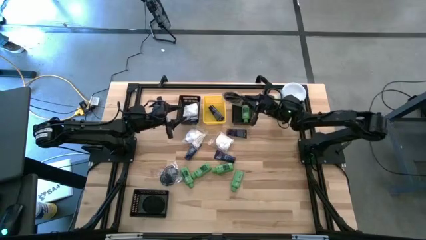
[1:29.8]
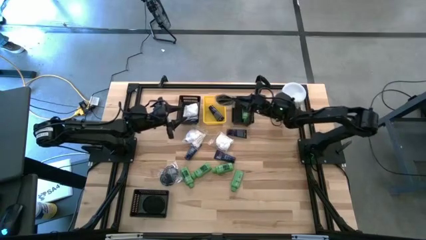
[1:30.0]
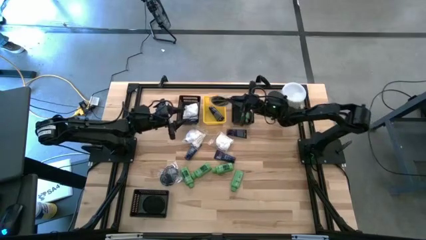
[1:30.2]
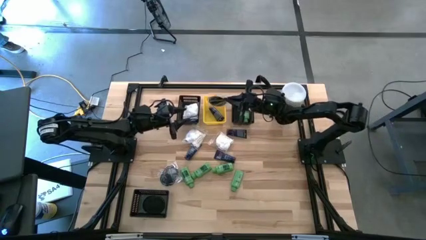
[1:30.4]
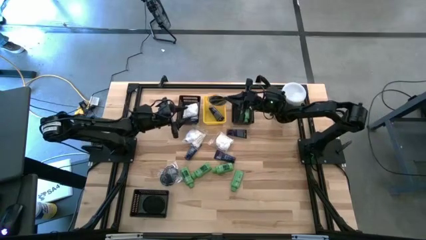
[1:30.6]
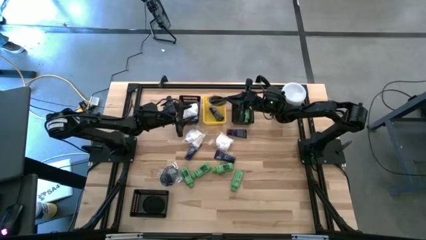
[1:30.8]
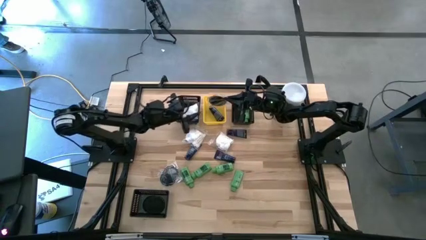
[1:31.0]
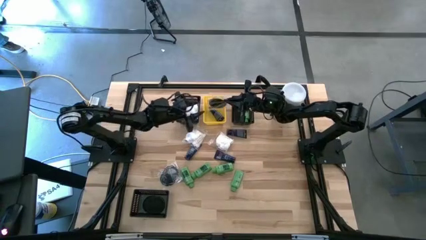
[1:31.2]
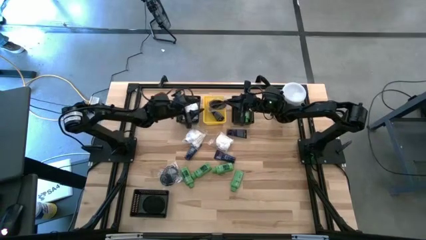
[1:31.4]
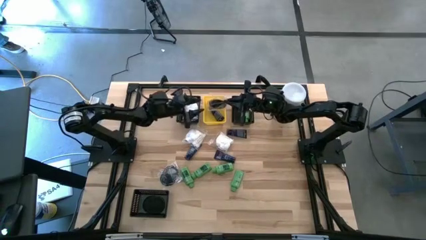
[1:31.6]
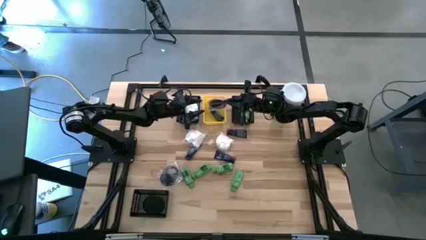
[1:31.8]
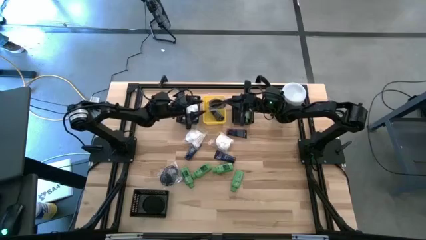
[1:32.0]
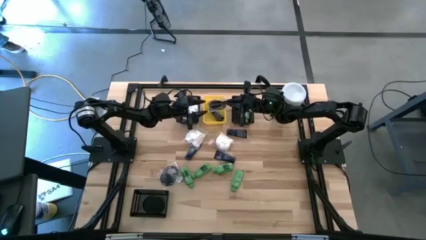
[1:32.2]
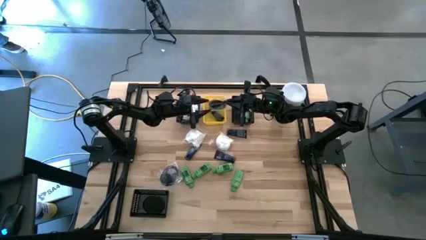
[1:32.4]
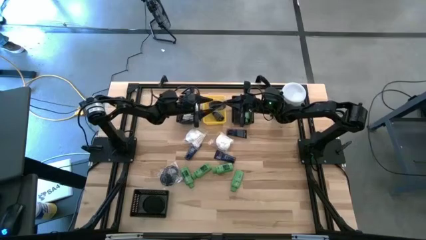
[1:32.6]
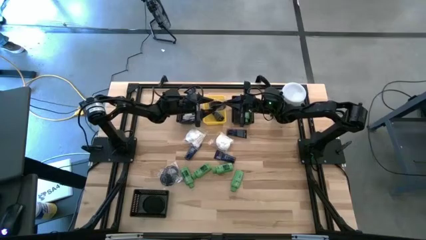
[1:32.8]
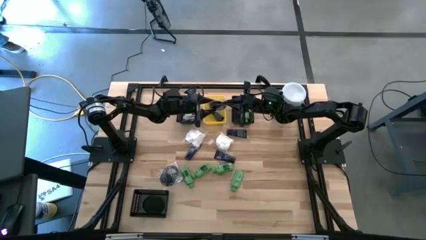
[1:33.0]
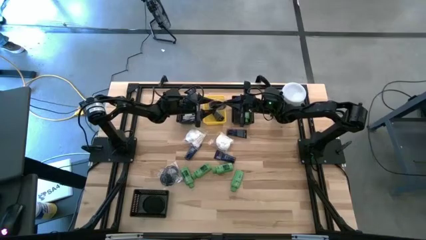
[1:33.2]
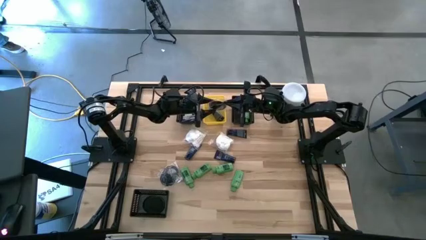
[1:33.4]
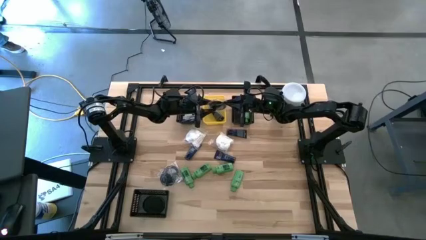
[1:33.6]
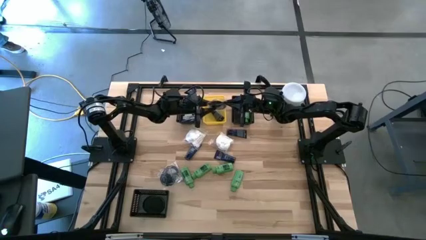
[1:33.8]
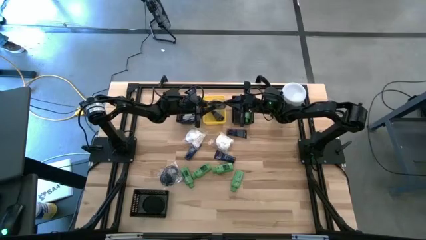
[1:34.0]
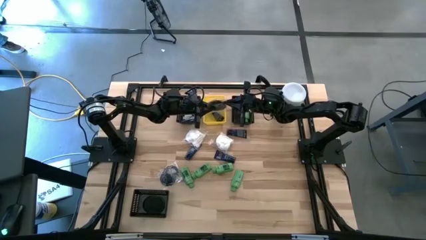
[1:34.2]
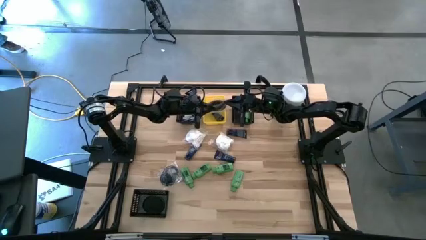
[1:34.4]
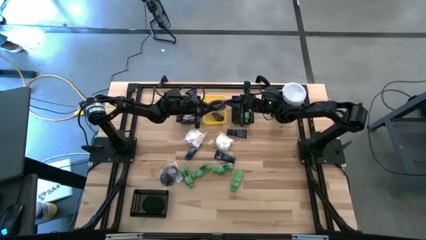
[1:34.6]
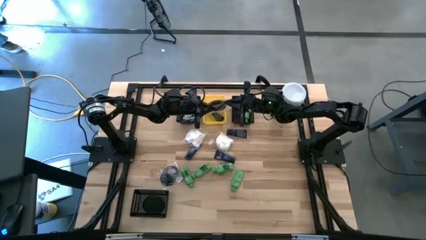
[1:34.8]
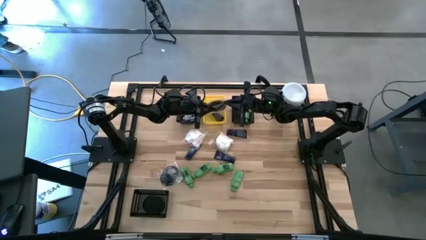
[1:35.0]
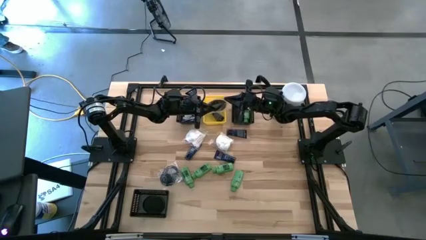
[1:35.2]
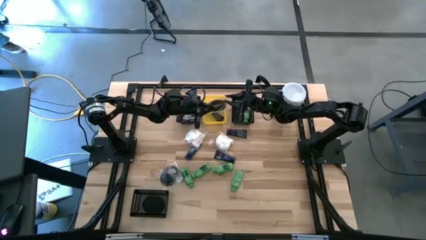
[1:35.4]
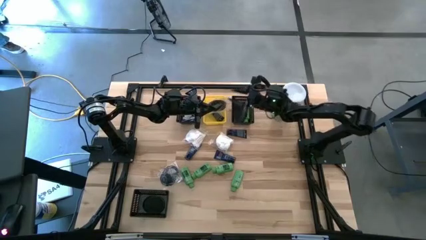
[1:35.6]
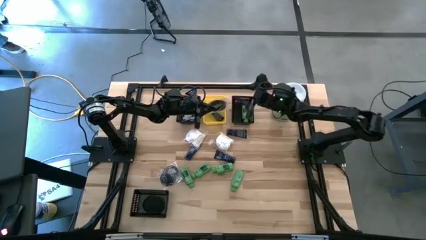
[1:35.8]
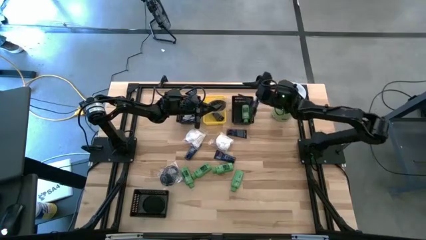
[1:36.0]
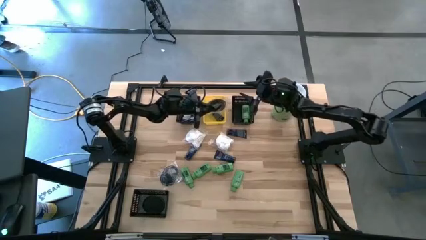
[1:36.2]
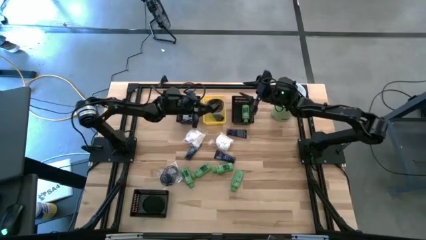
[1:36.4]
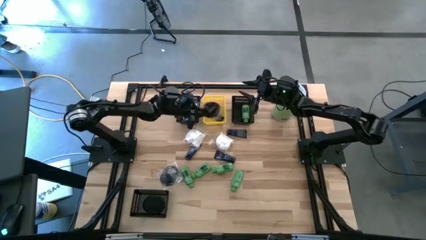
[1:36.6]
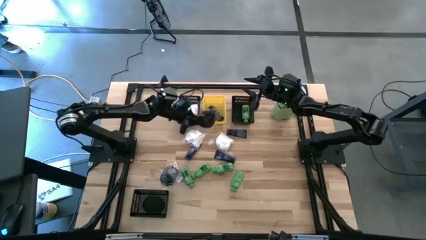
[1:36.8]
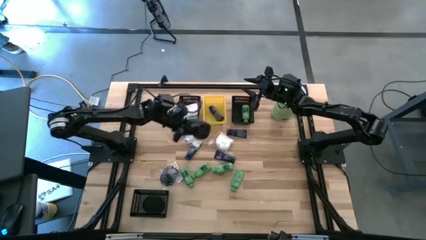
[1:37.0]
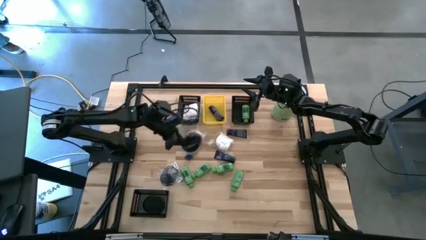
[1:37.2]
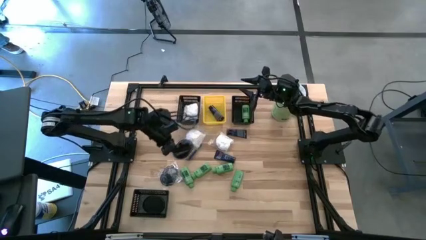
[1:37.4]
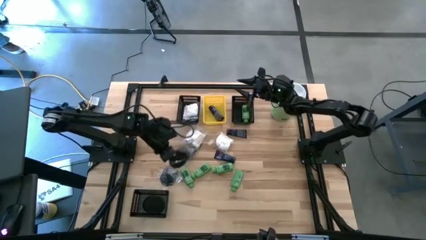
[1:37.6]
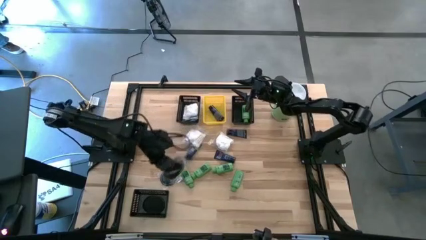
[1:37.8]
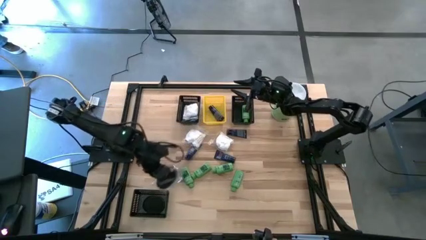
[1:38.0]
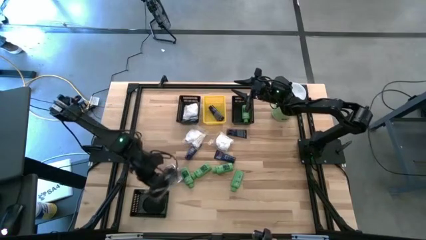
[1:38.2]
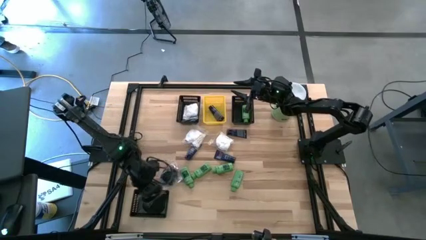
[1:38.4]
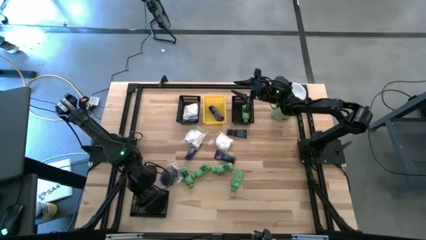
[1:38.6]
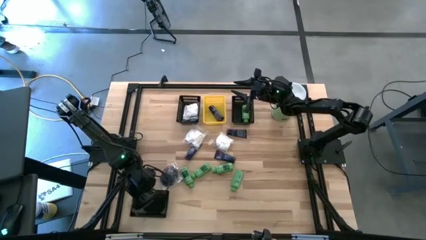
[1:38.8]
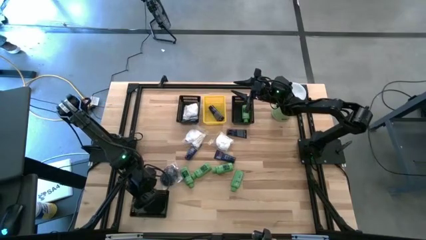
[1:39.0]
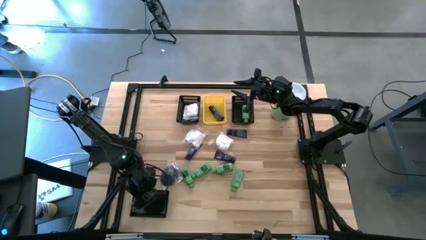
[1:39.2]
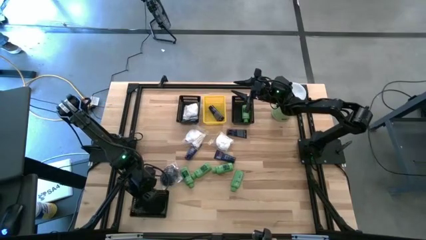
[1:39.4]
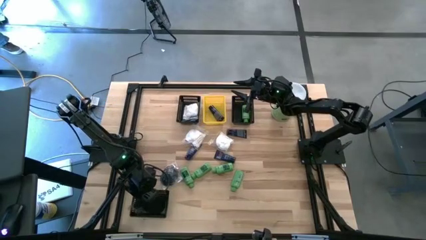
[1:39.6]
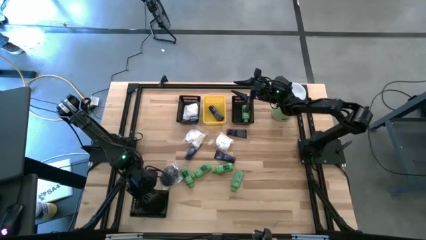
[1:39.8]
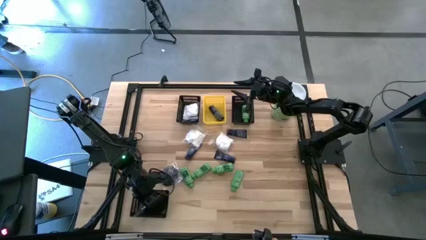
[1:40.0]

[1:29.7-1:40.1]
Task: Pick & Place Travel size toiletries
Put the black hairbrush into the bottom black bin

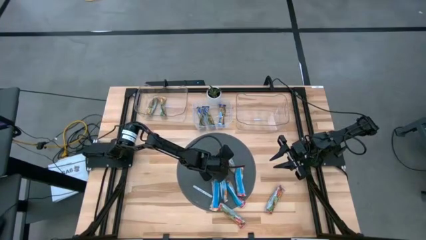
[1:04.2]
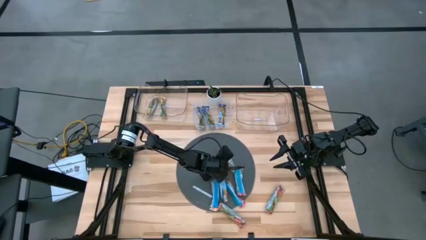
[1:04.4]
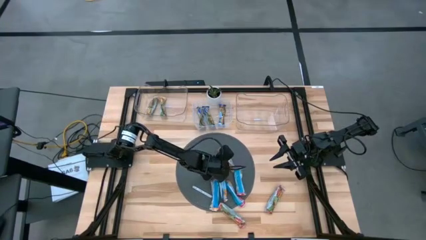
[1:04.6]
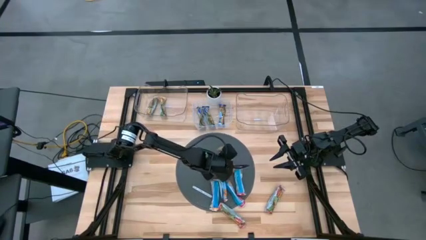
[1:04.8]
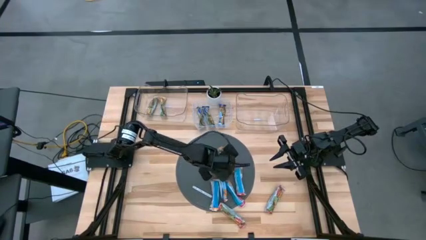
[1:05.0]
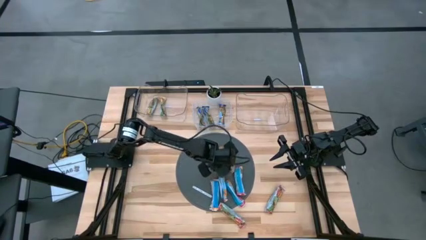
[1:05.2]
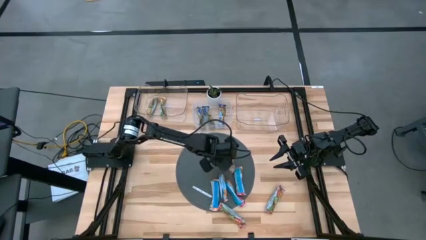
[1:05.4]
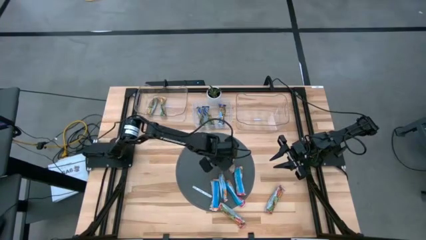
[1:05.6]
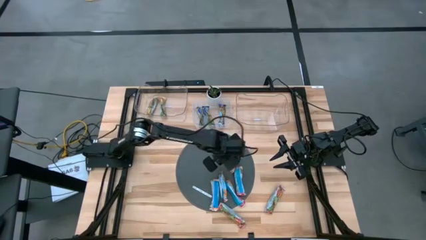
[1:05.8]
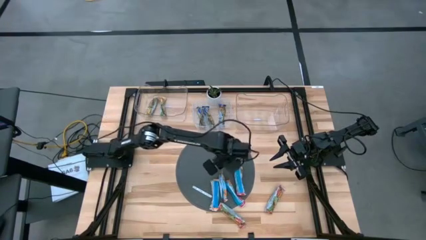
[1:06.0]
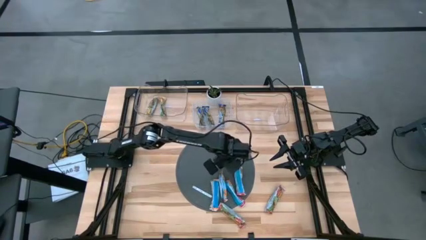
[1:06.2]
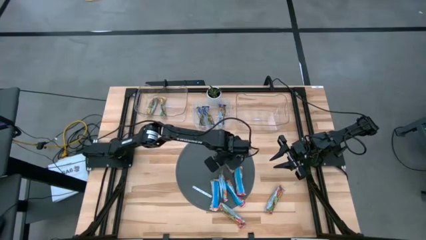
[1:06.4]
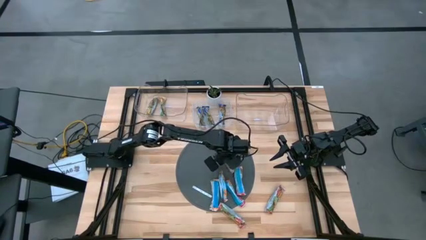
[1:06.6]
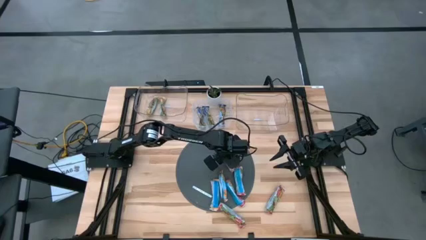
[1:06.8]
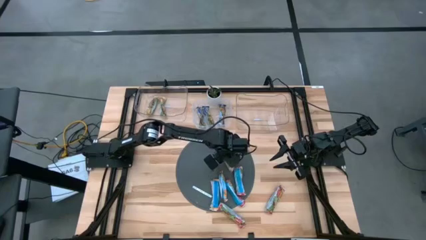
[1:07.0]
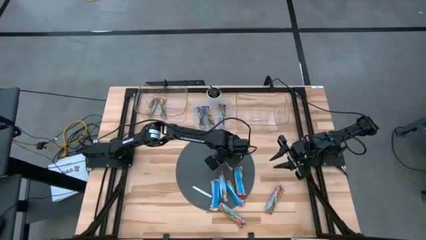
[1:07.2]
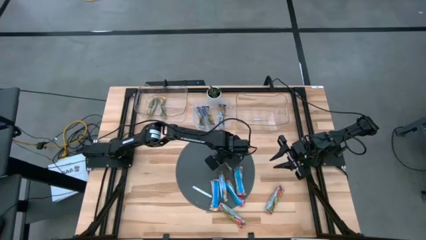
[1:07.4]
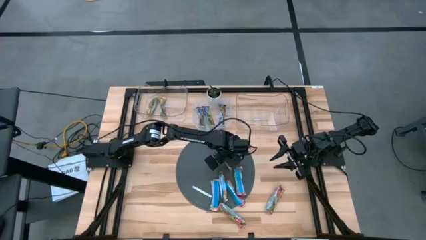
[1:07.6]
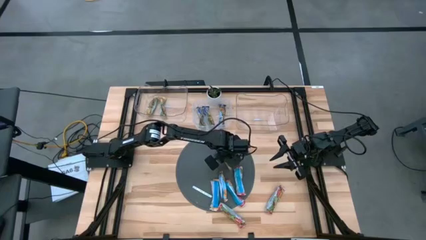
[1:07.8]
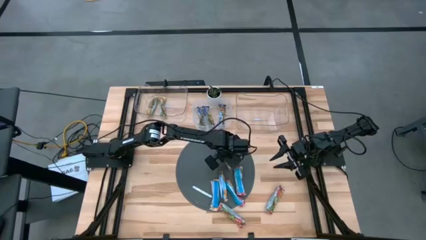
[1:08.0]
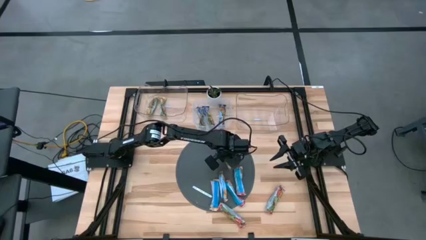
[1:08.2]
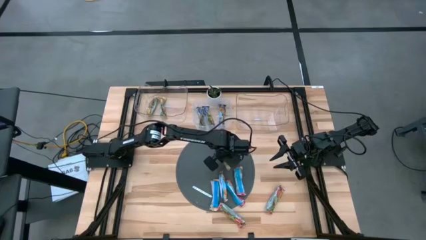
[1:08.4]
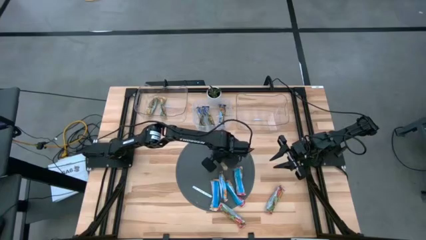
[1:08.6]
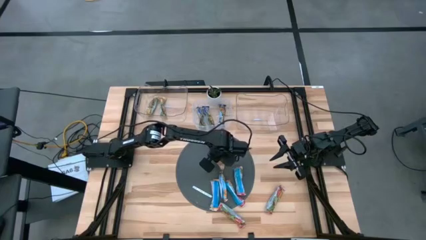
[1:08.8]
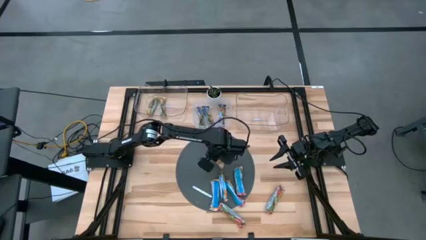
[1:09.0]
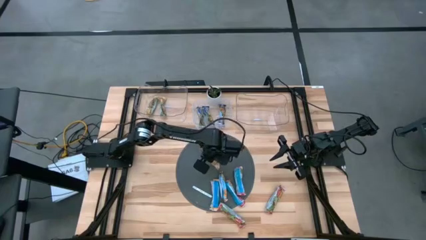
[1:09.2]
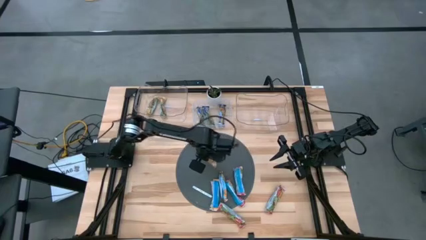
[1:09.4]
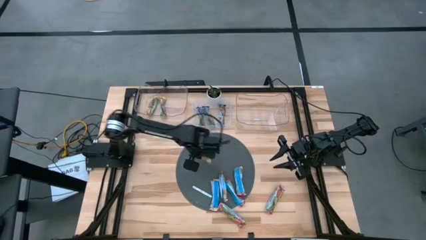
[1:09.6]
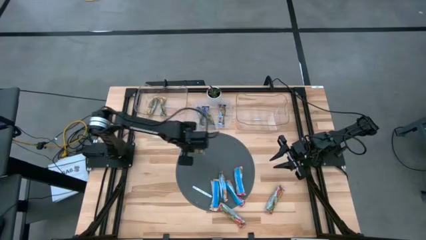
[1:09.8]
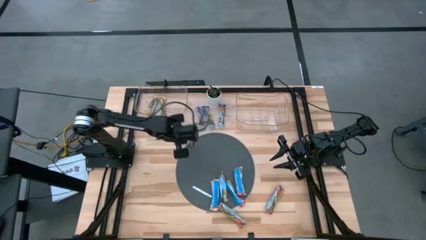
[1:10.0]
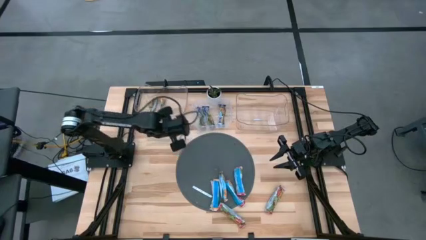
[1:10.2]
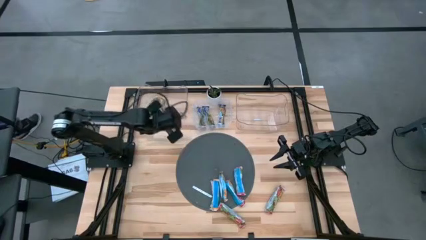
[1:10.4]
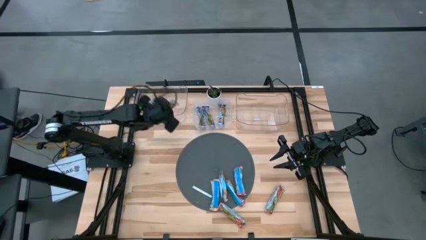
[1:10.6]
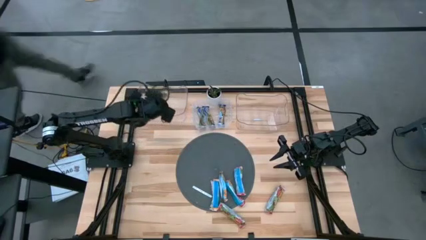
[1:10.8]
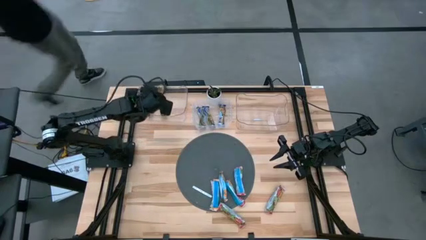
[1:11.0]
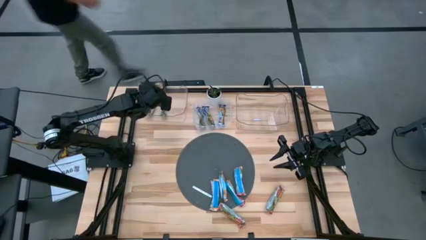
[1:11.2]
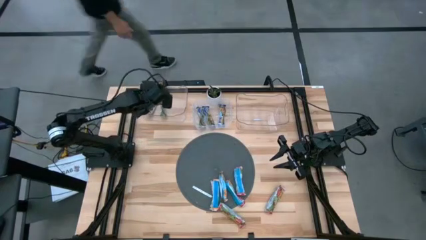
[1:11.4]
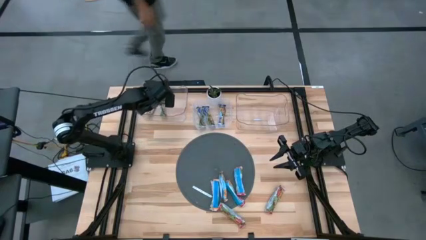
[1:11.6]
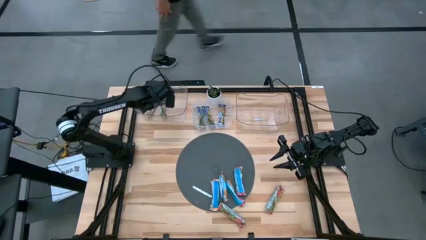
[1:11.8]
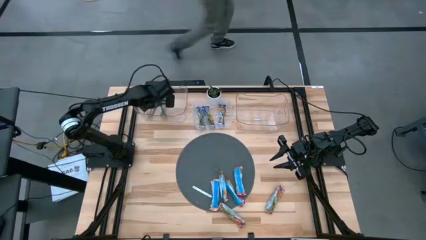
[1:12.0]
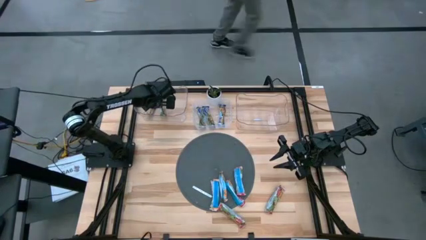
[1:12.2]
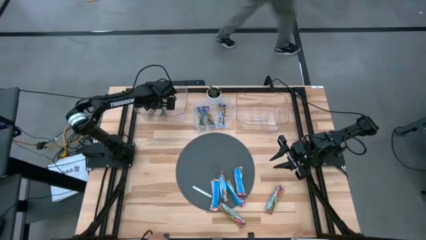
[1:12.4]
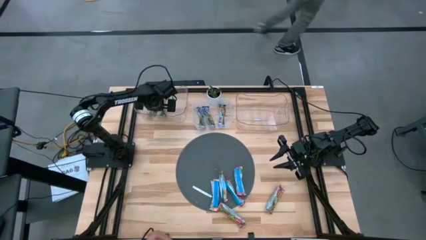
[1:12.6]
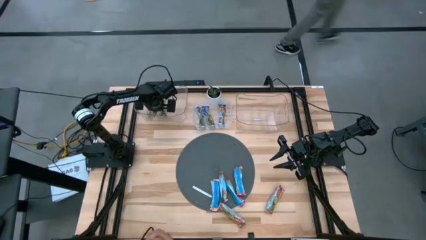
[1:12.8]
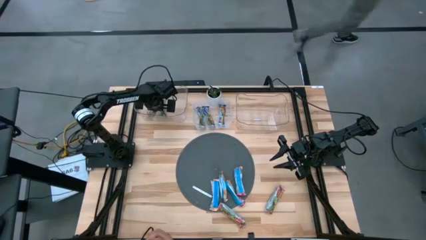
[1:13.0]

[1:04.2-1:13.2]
Task: Pick and place Granola Bars by type
Put the yellow granola bar into the left transparent bin
